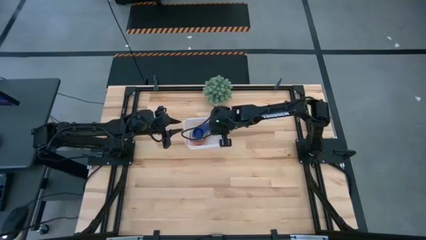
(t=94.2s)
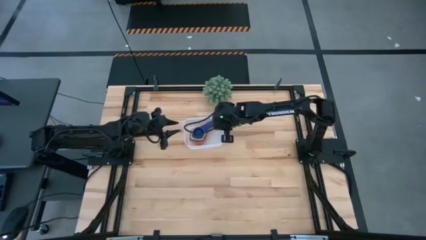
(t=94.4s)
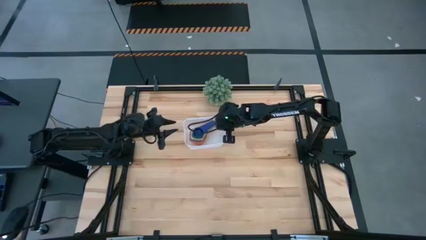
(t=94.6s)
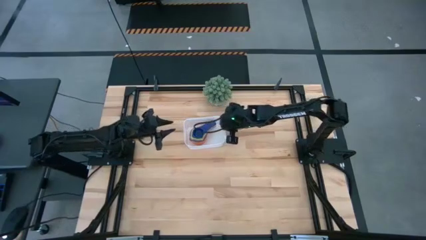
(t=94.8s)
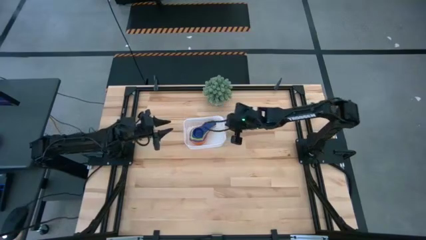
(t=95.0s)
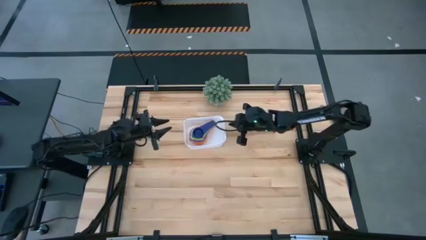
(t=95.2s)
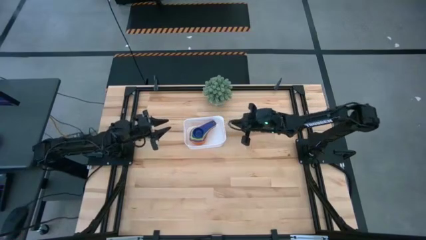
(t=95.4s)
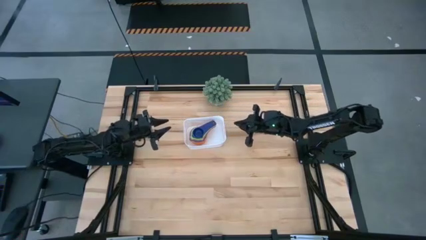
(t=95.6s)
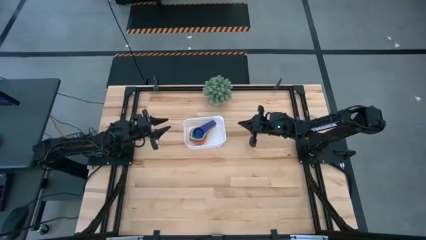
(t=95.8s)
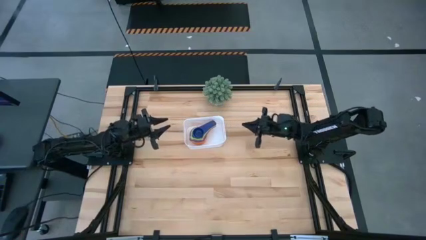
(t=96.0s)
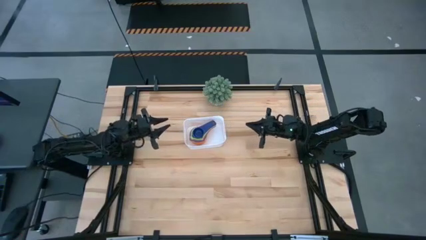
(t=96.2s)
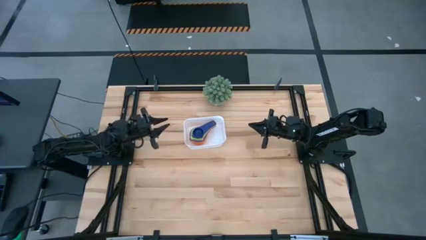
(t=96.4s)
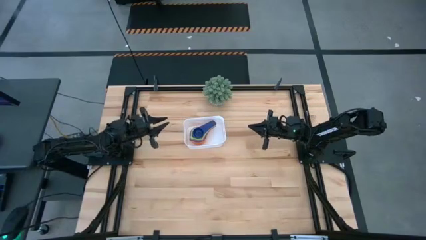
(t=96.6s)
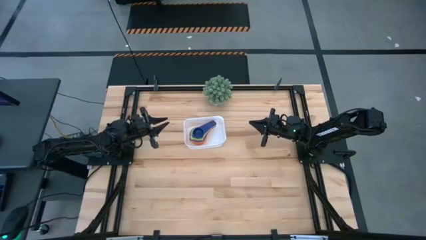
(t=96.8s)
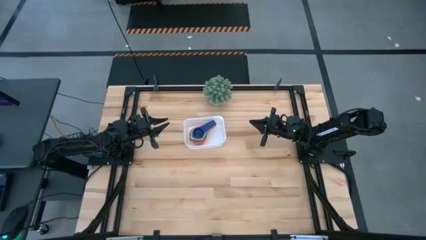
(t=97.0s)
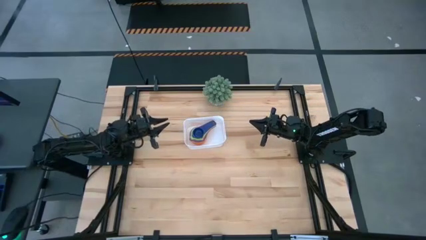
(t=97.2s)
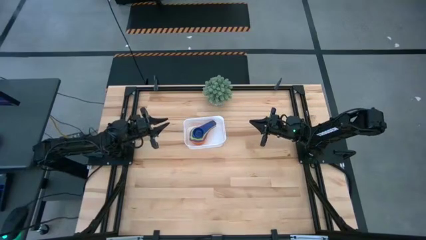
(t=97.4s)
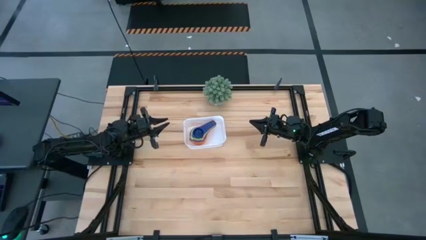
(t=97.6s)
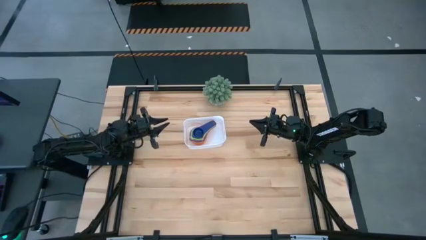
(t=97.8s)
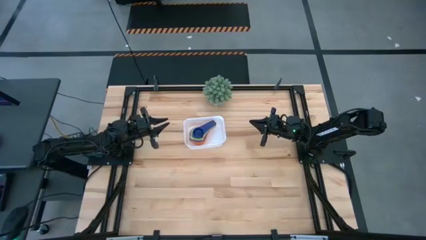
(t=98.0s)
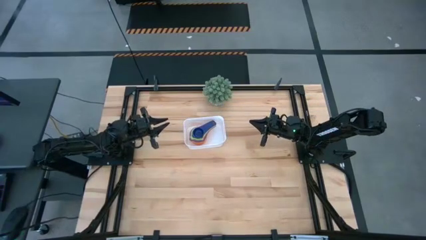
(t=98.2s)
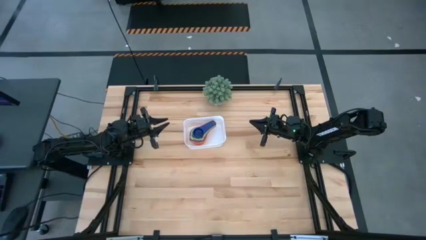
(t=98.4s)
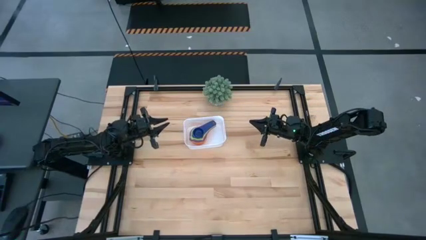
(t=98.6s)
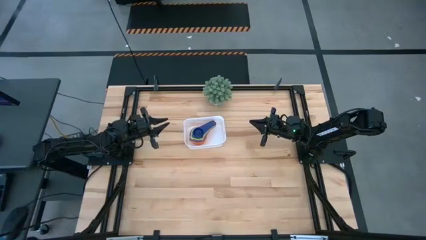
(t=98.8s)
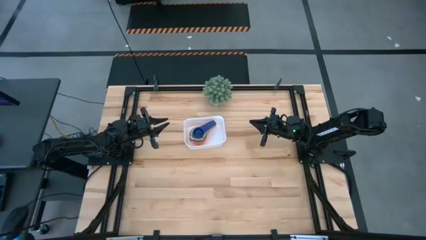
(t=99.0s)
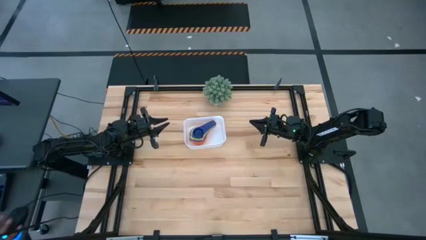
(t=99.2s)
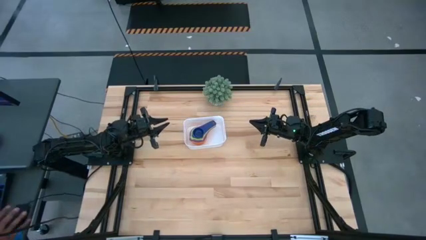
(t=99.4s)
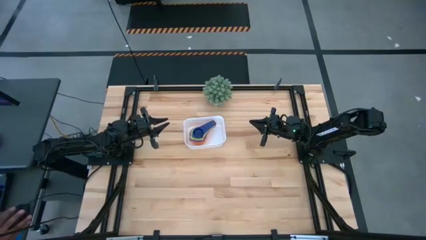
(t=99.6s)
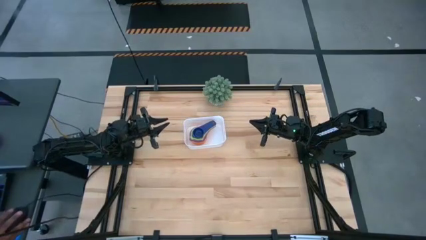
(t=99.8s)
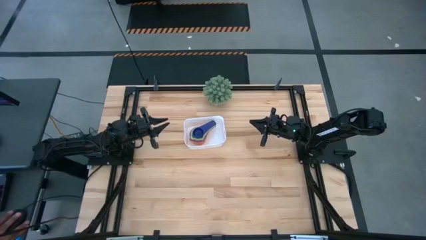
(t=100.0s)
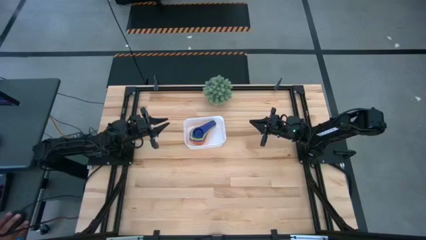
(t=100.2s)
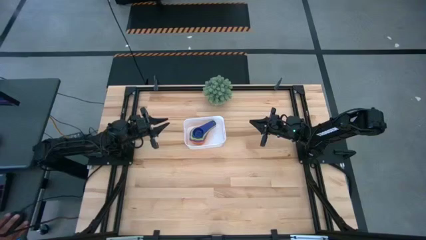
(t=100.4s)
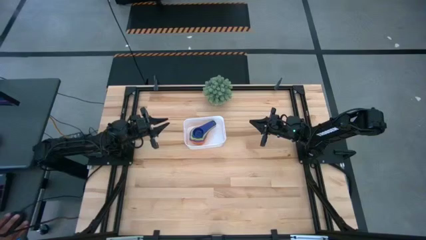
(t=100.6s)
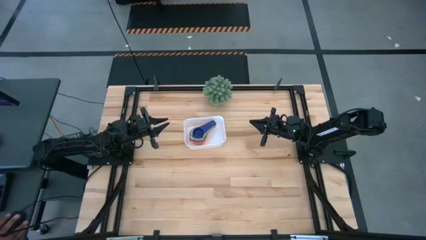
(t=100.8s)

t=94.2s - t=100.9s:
Task: Nest measuring cups in basket
Return to Home Position

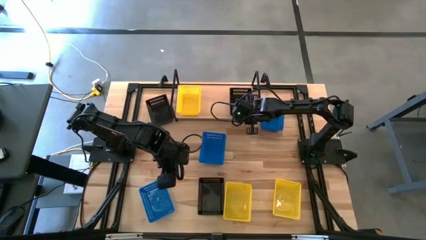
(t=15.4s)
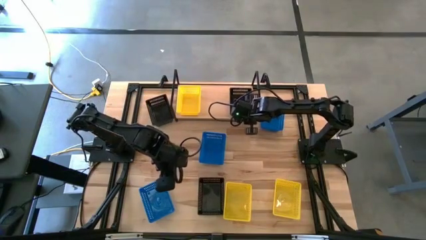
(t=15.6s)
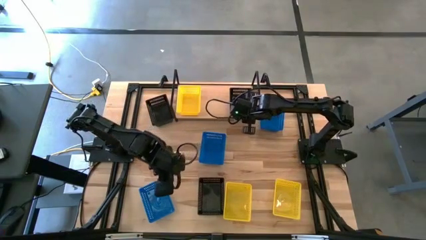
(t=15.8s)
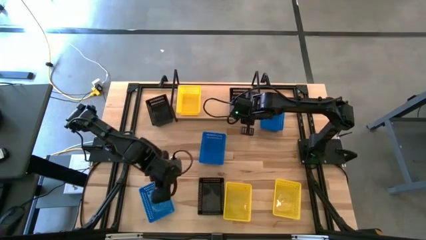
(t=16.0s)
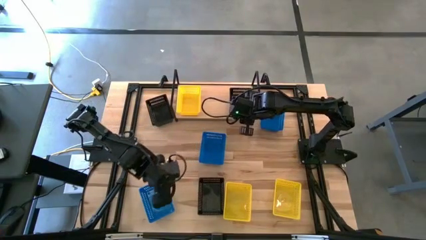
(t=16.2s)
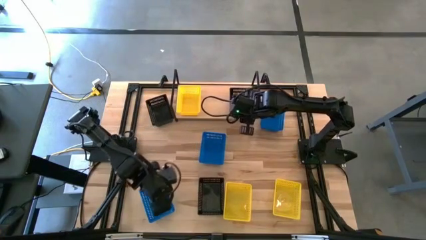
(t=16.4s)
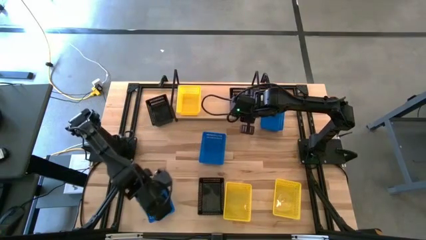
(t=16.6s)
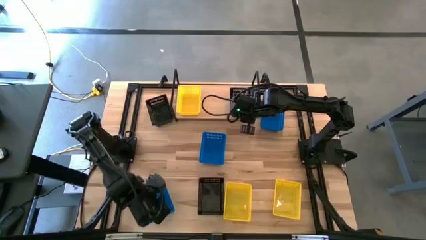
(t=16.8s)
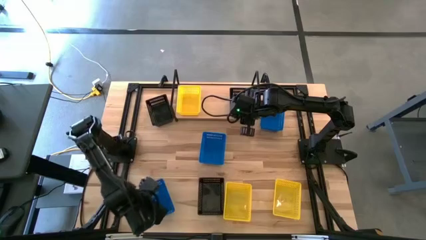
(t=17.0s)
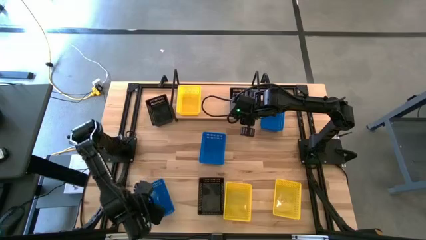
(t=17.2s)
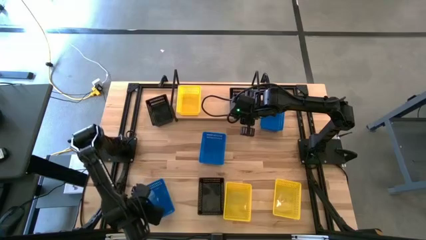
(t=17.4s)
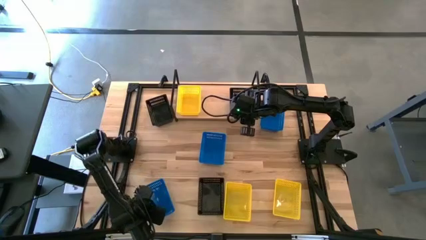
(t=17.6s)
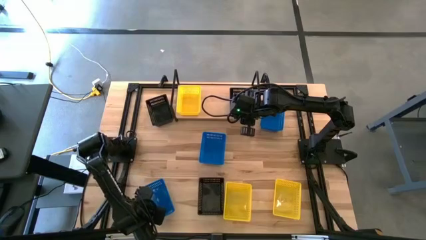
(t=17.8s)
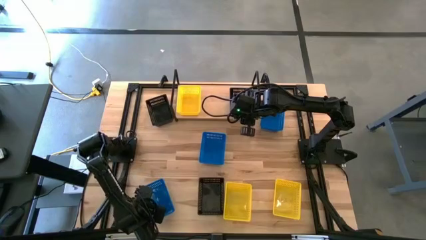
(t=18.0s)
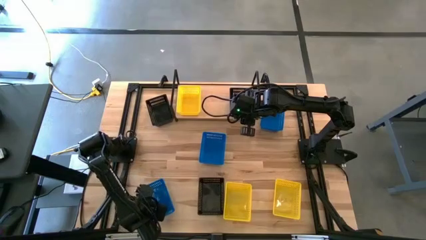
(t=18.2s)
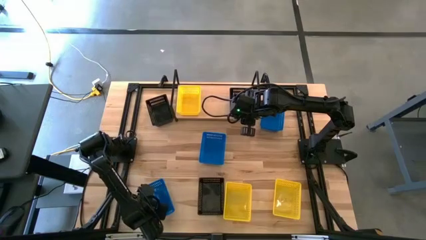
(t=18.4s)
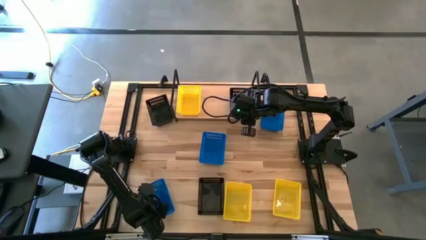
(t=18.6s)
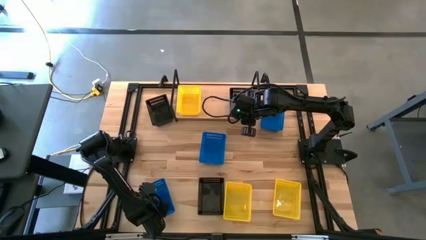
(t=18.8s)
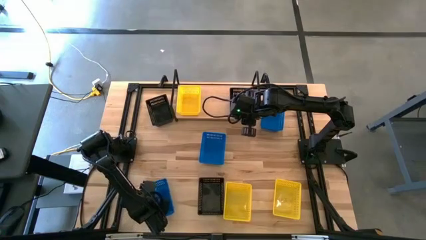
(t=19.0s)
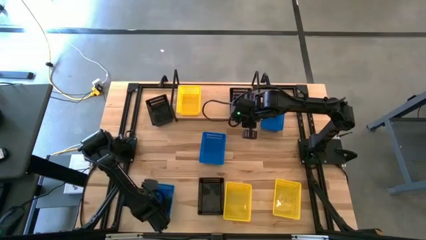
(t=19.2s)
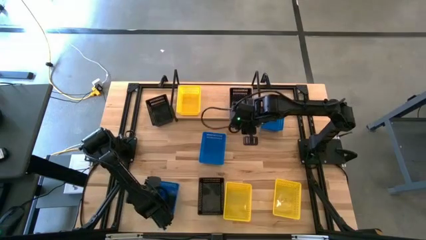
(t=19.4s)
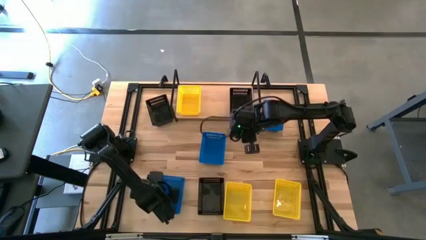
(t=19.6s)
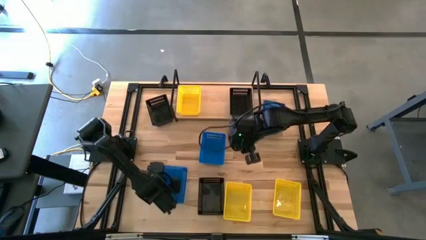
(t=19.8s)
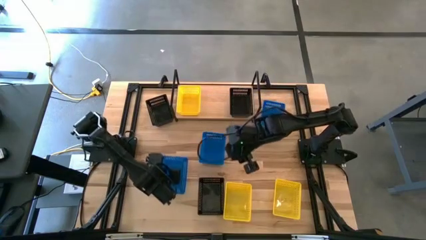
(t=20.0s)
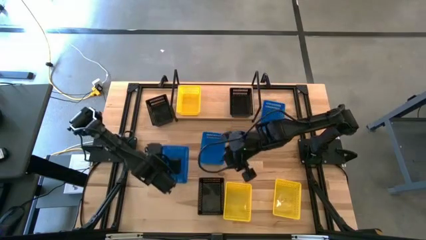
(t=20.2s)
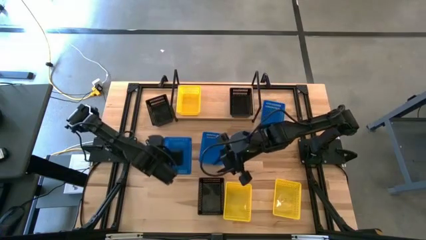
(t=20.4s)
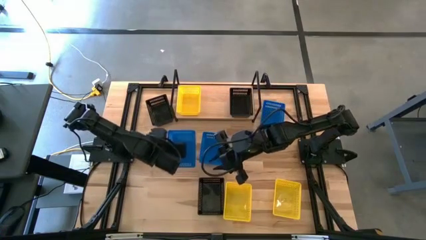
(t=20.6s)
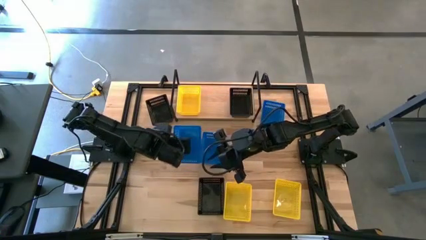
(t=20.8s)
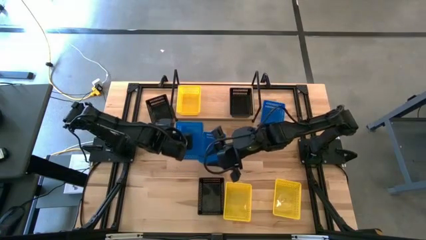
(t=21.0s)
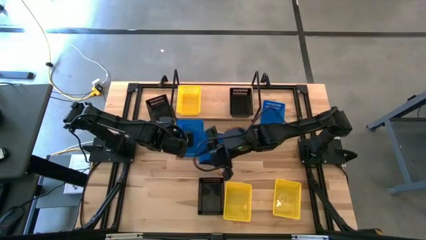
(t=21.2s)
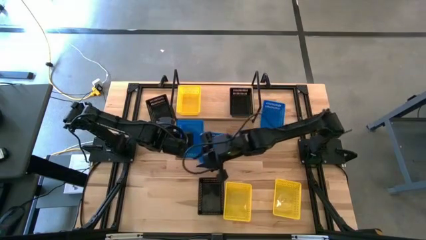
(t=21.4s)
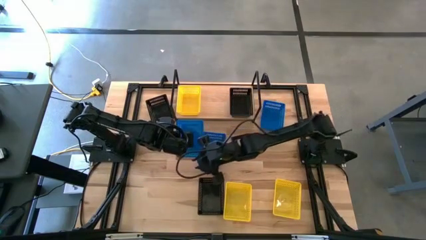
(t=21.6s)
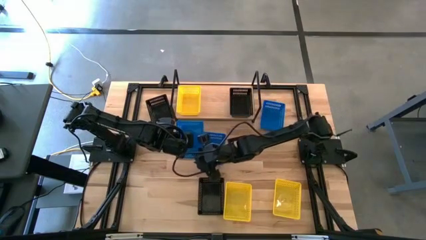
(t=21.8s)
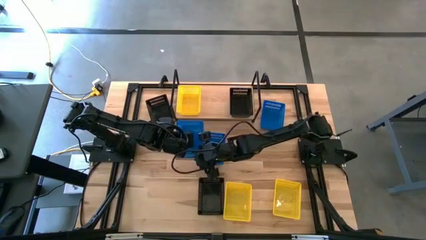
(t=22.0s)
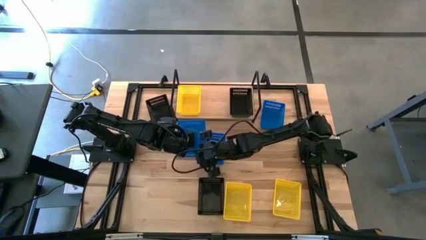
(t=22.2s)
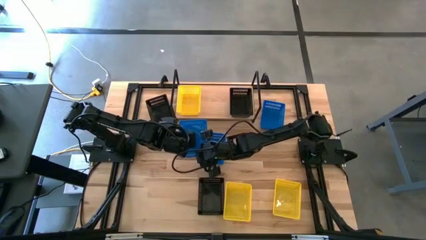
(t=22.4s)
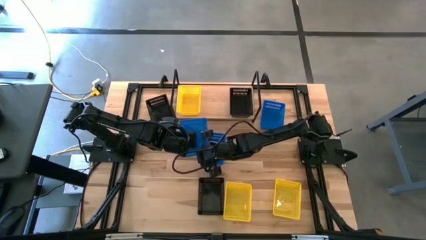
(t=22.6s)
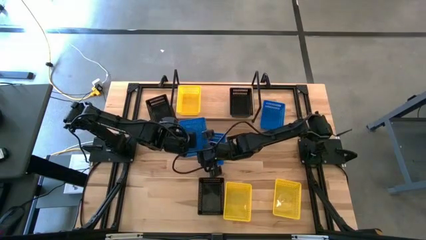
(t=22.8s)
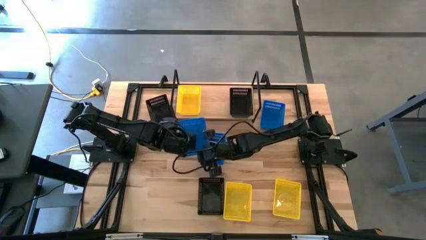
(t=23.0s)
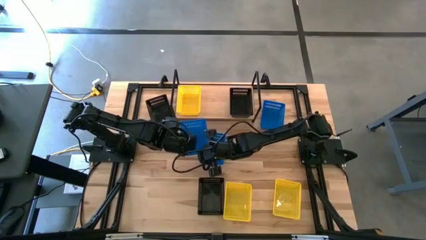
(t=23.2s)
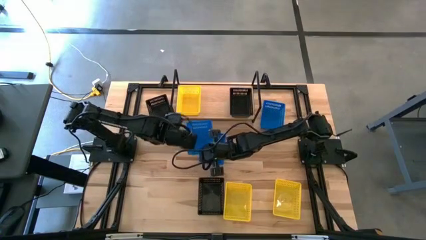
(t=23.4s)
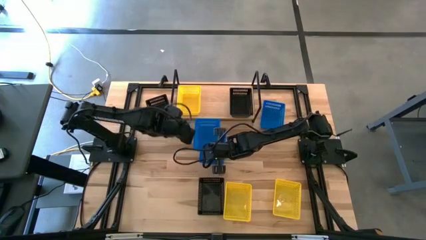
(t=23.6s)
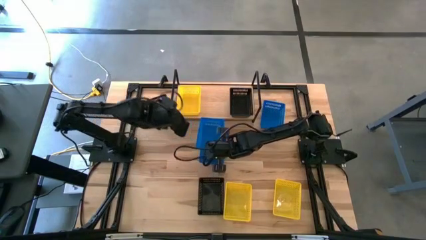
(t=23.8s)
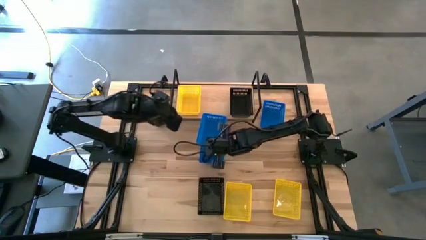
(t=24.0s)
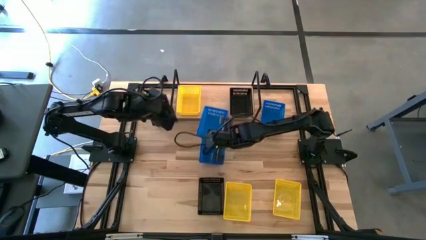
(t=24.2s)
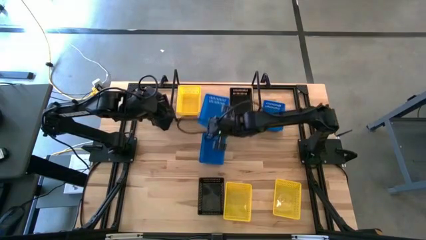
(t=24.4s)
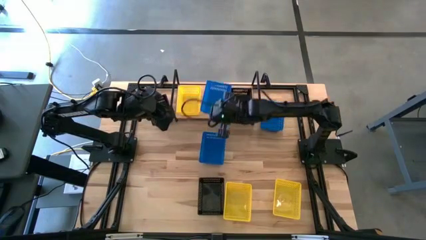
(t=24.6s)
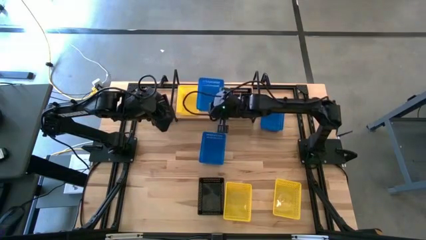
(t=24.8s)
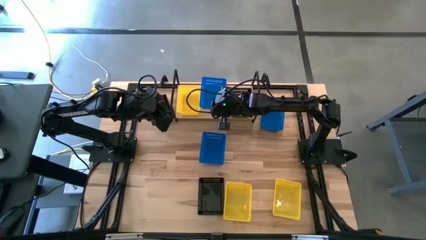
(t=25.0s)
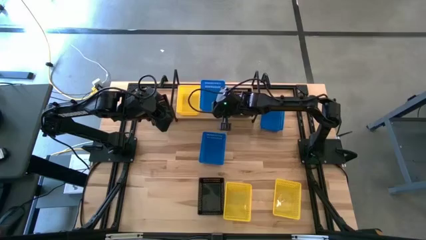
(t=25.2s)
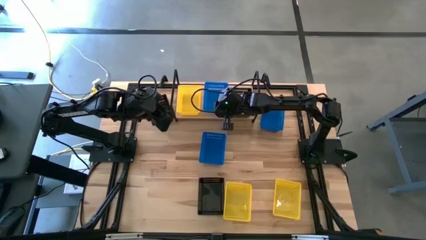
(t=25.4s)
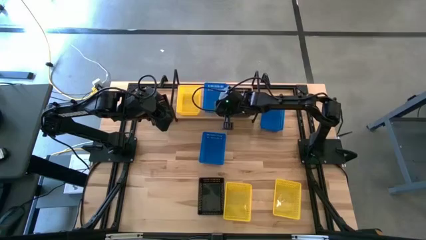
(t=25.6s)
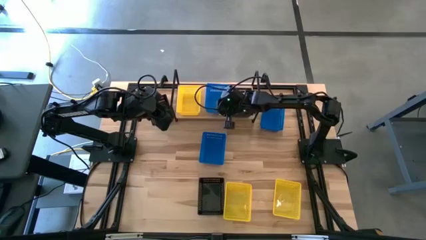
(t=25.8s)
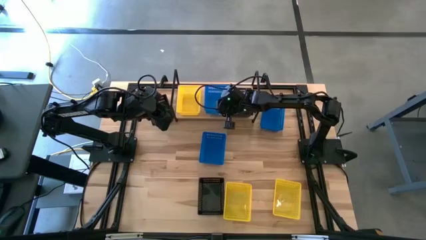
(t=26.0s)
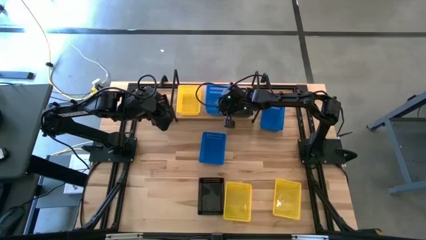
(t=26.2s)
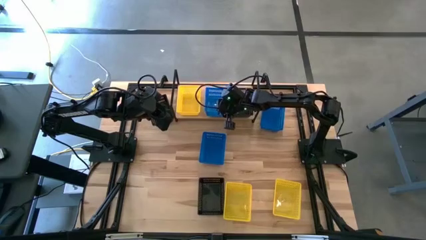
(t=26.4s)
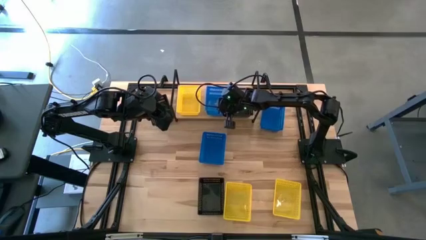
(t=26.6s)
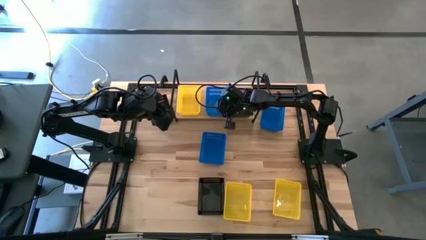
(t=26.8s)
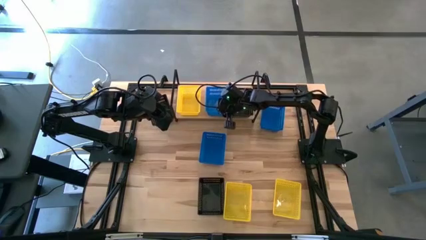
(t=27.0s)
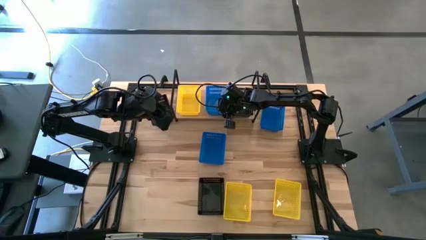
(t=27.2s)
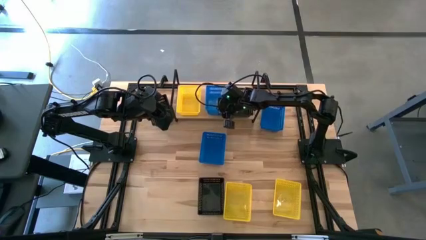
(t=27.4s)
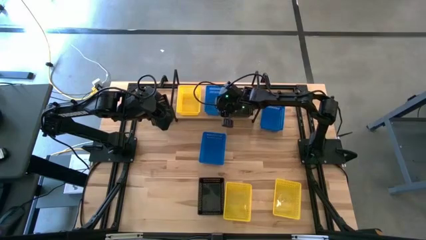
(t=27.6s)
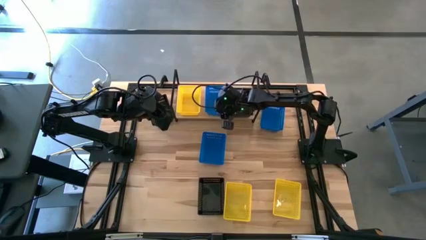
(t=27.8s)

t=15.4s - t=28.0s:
Task: Stack baskets on shelf by color
Put the bottom blue bin on the shelf
